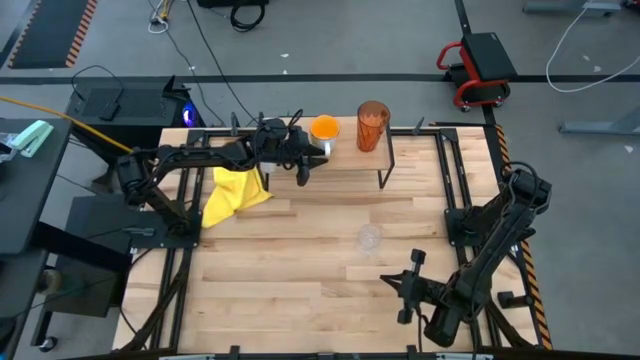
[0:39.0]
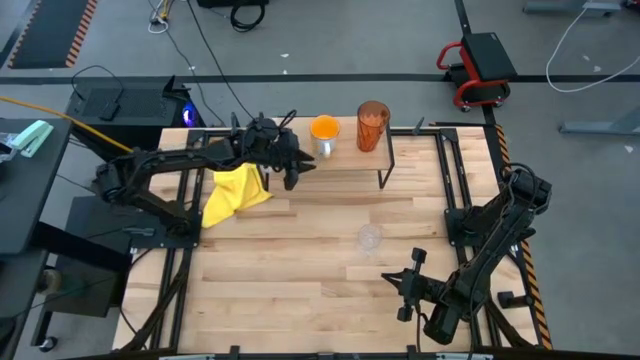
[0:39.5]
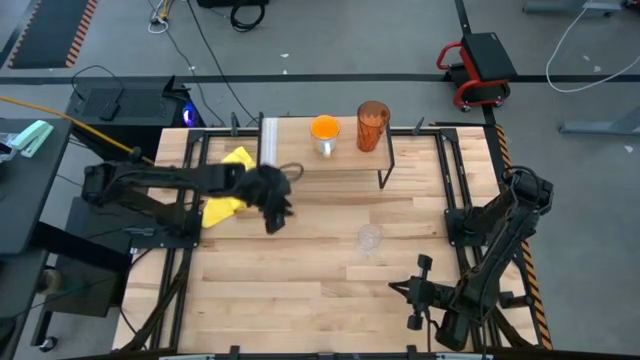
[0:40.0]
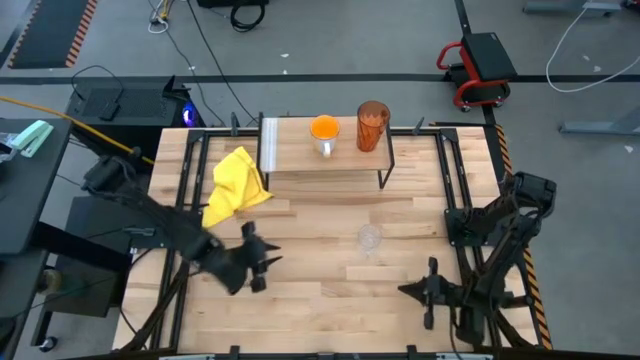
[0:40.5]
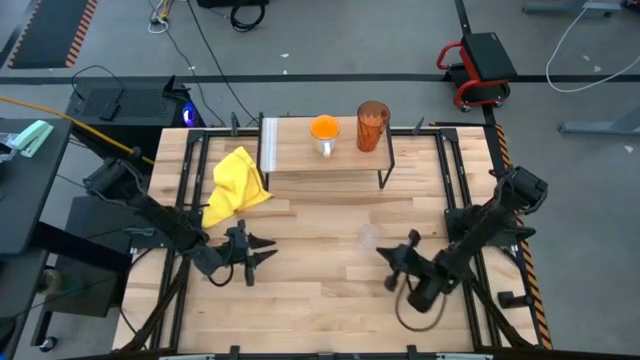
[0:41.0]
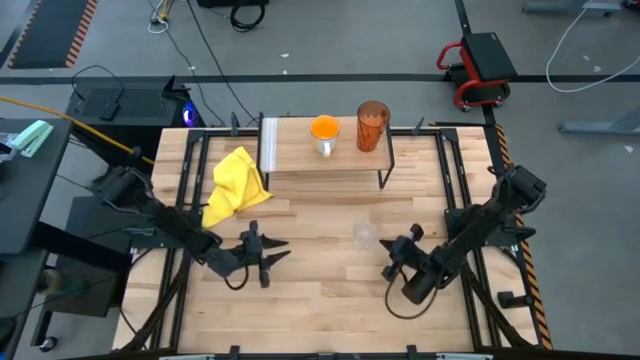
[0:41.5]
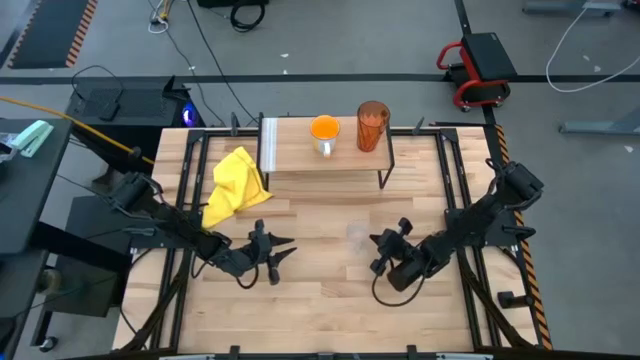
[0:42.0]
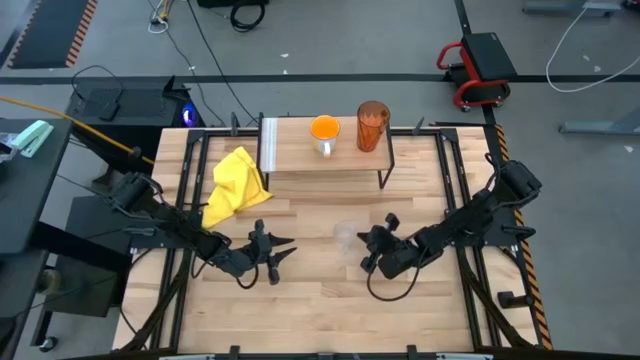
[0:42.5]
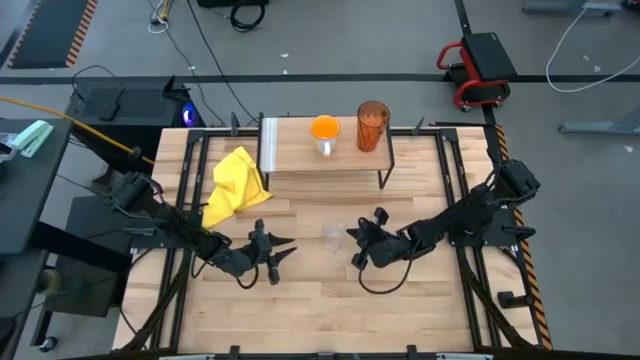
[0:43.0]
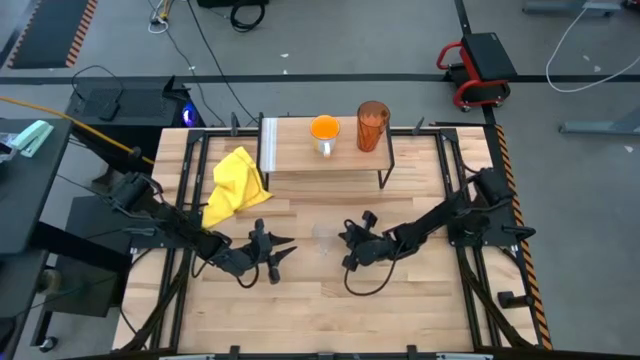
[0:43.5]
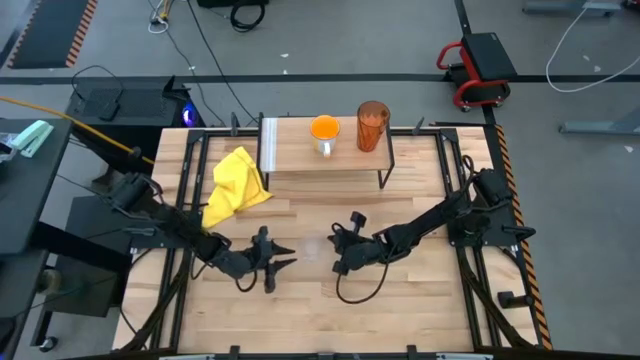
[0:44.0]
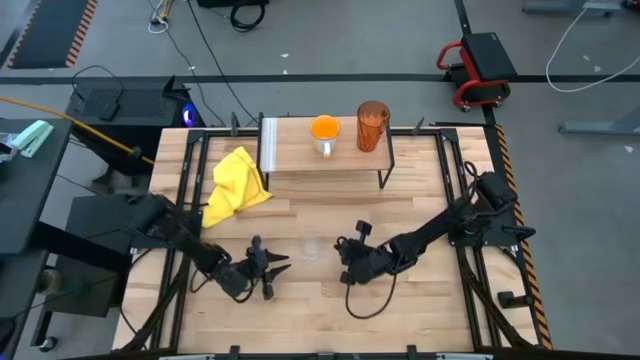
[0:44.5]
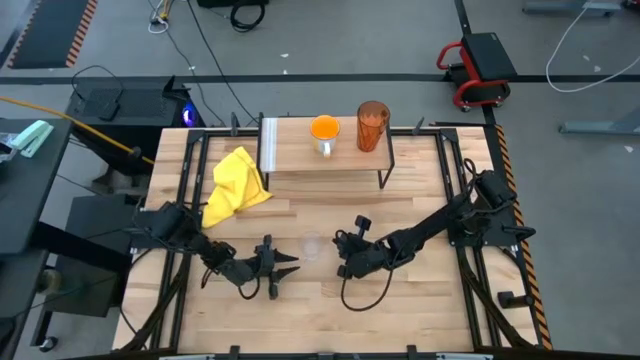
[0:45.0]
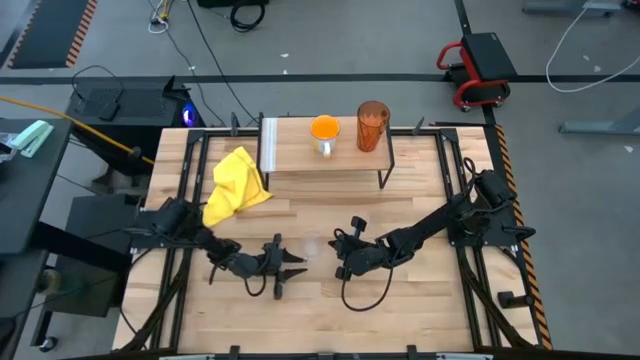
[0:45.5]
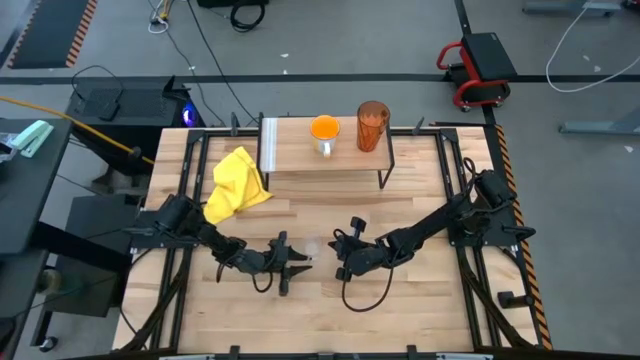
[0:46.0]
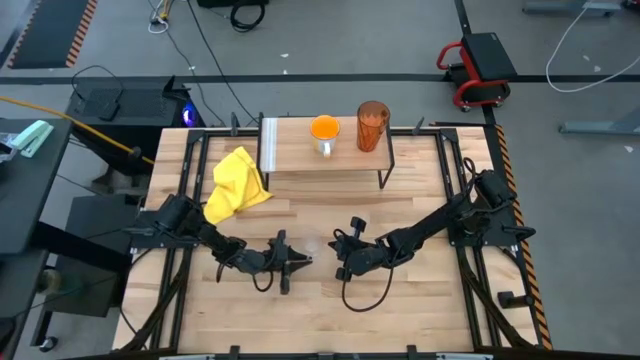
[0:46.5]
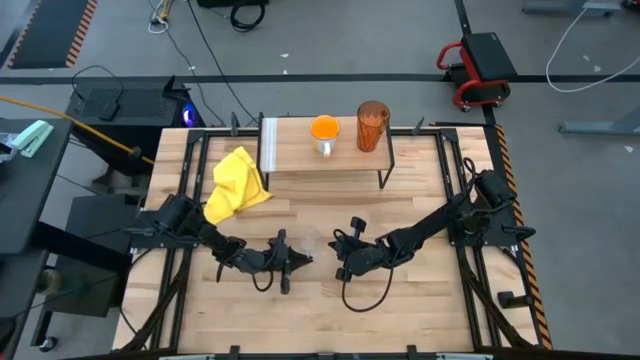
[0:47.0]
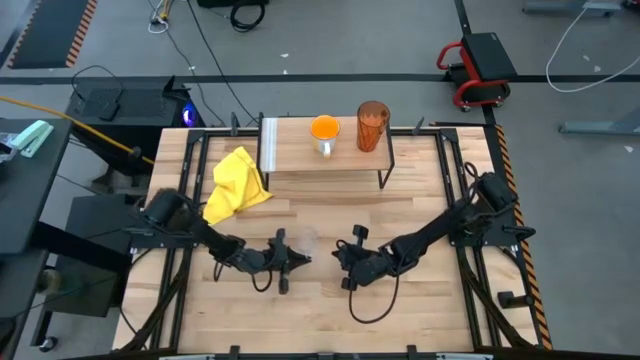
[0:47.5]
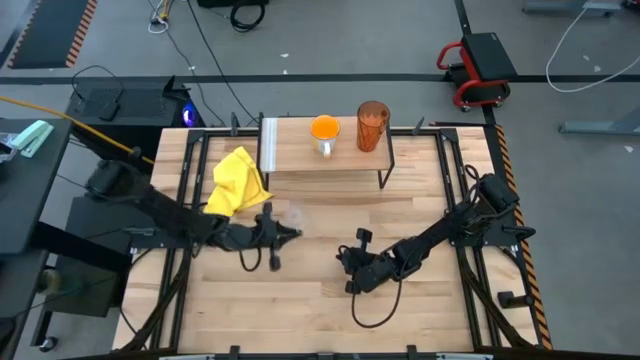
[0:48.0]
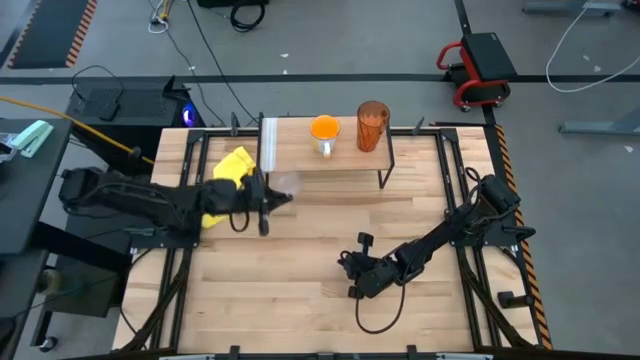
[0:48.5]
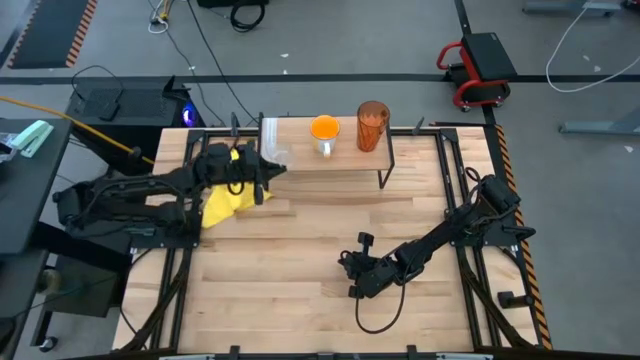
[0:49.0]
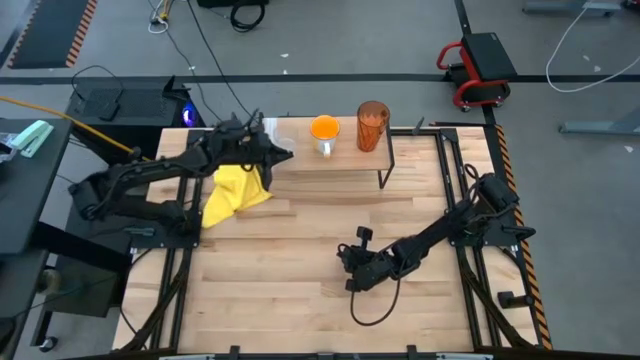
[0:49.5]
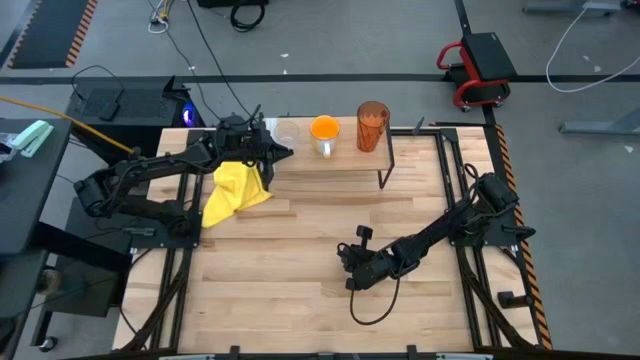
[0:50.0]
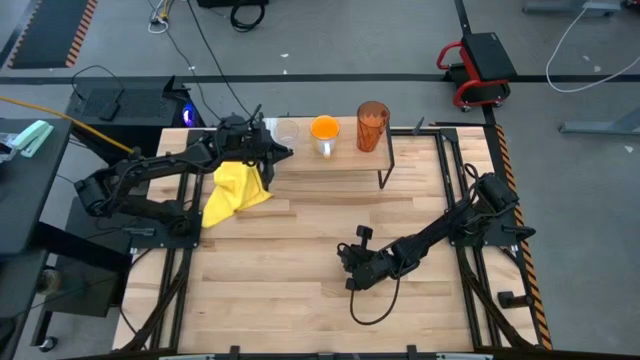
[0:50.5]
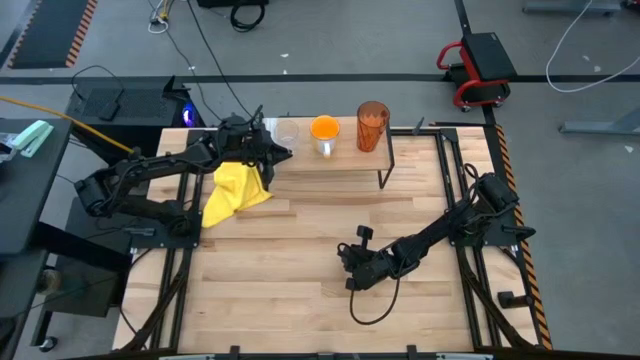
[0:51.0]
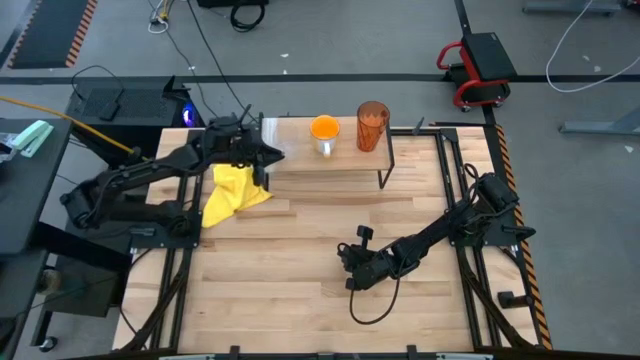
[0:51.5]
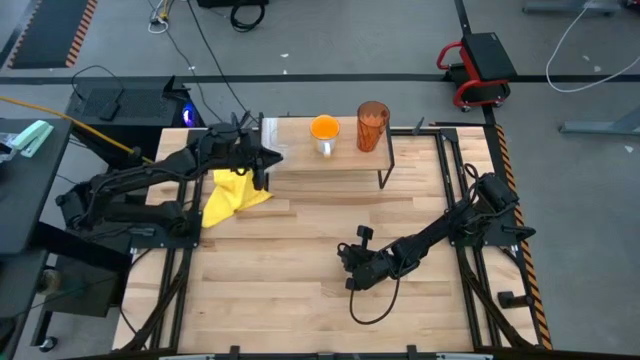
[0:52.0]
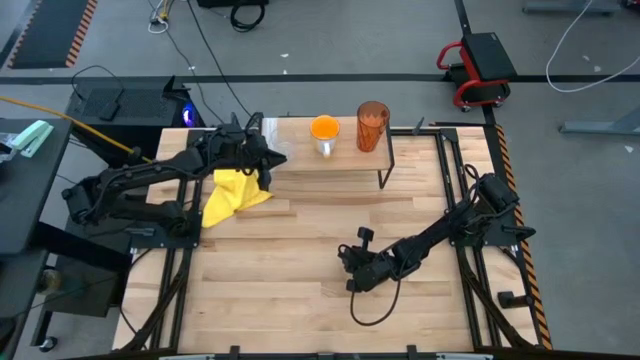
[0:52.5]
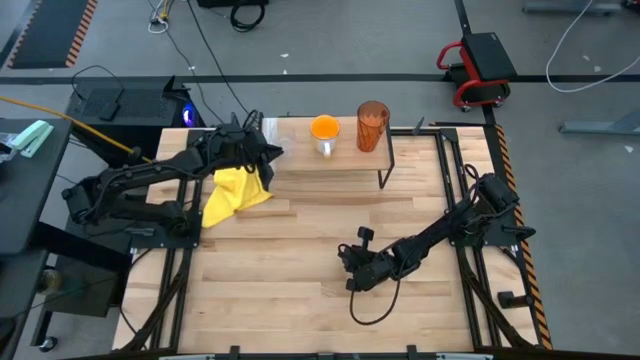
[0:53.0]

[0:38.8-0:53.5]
Task: Stack small to large cups/mugs on shelf
Put the transparent mug on the shelf

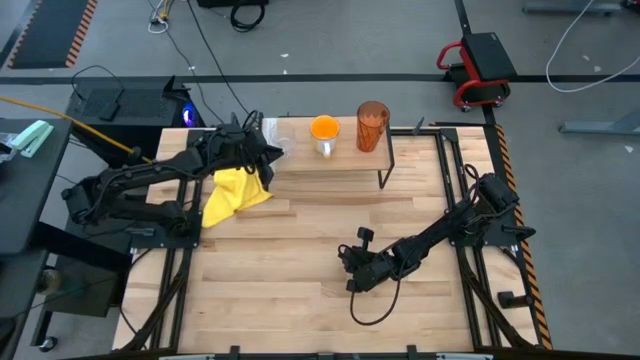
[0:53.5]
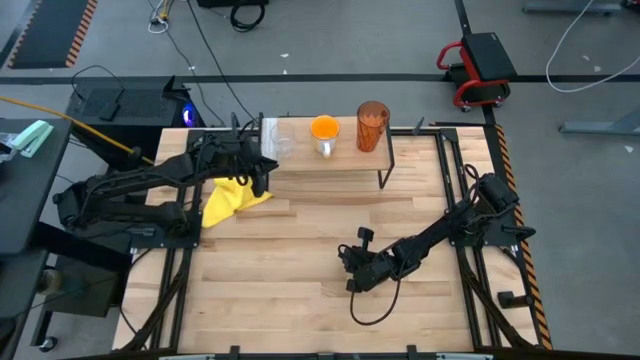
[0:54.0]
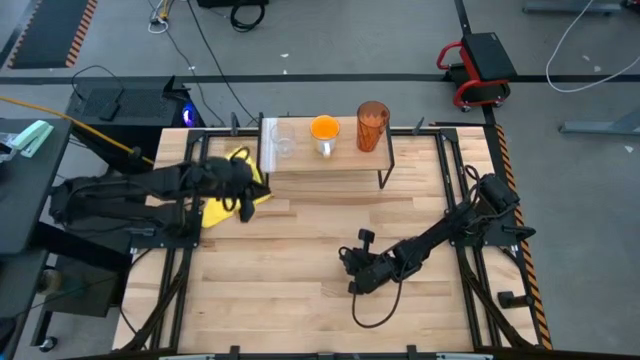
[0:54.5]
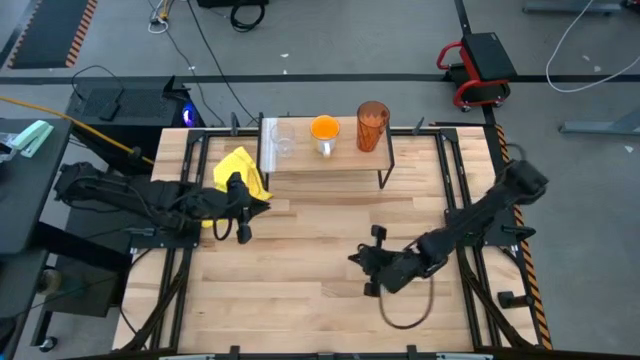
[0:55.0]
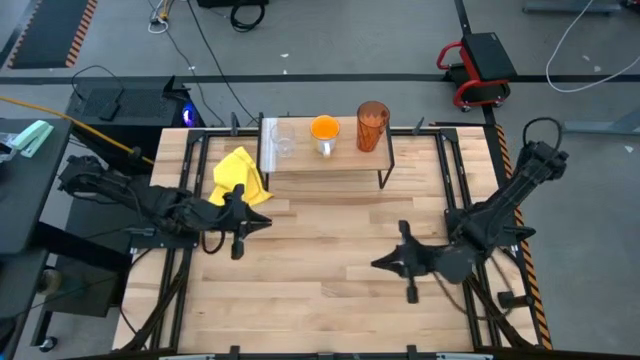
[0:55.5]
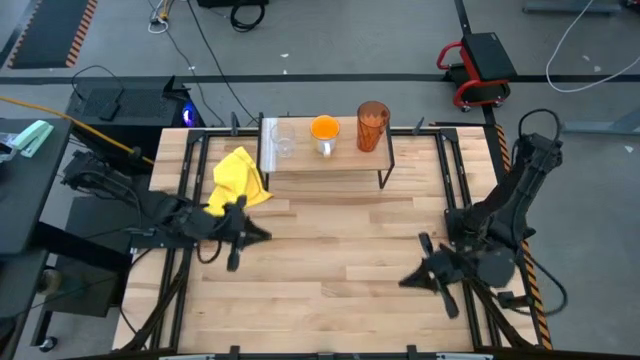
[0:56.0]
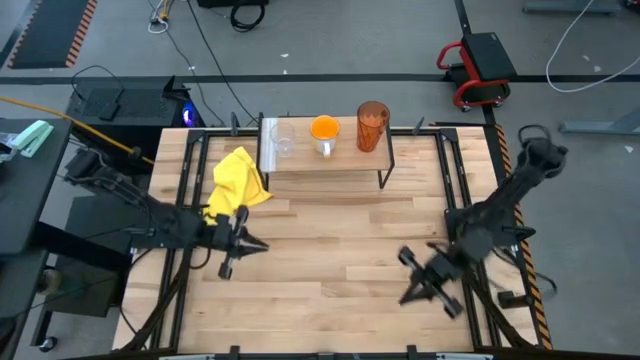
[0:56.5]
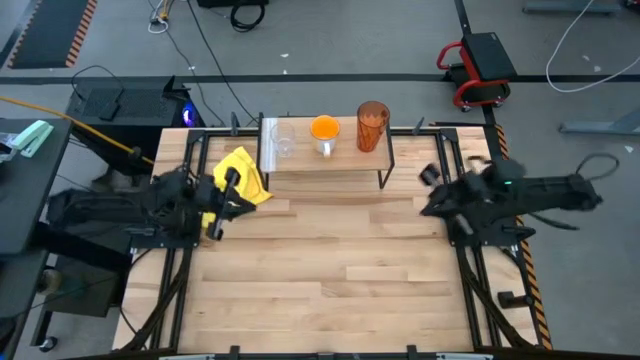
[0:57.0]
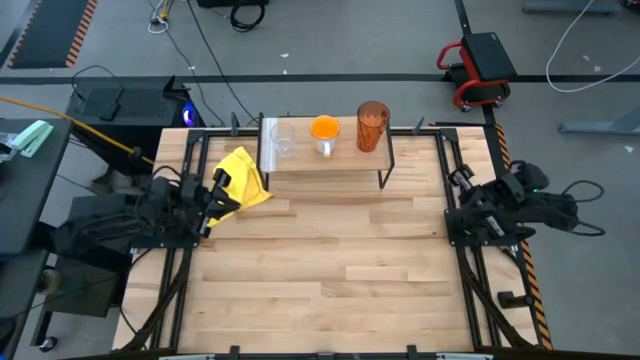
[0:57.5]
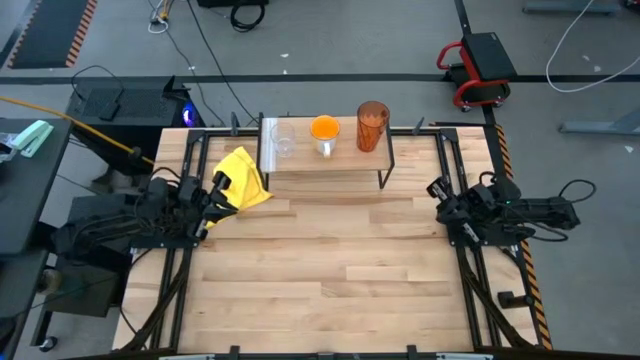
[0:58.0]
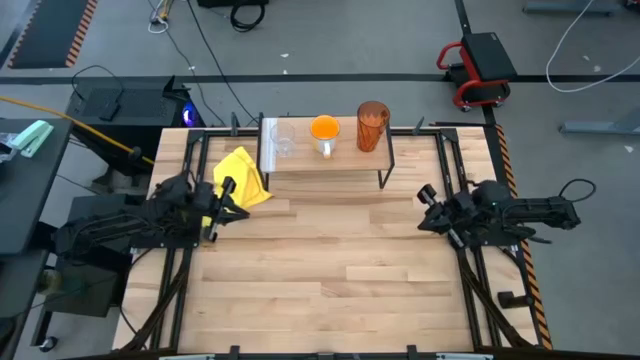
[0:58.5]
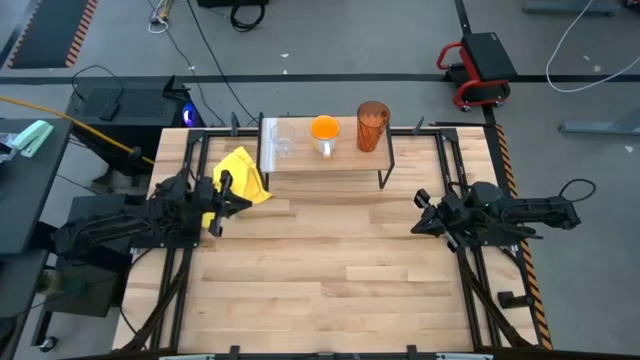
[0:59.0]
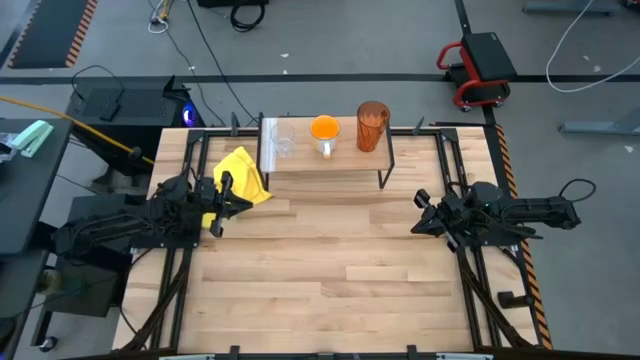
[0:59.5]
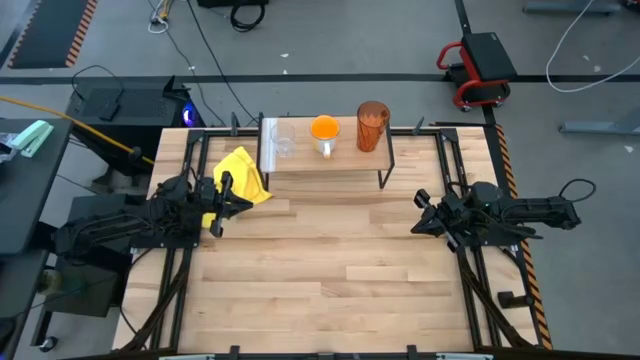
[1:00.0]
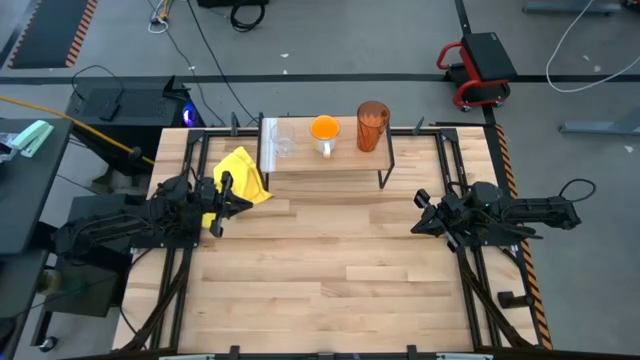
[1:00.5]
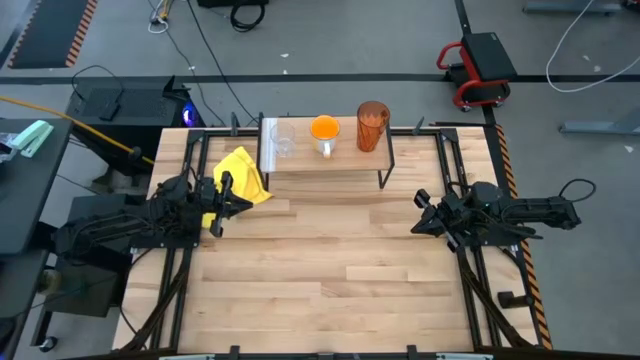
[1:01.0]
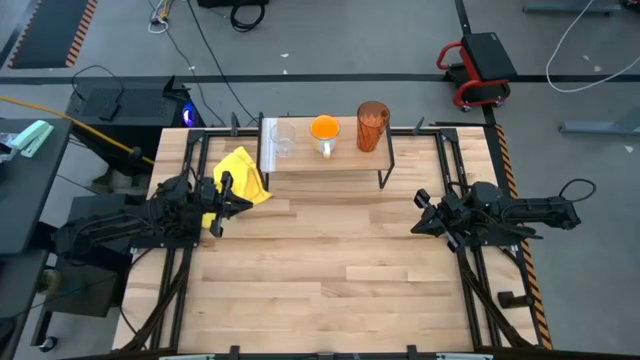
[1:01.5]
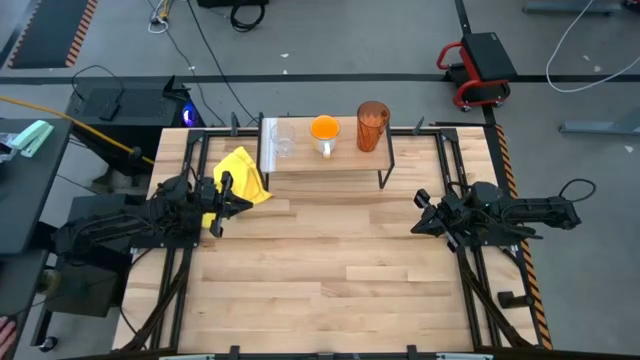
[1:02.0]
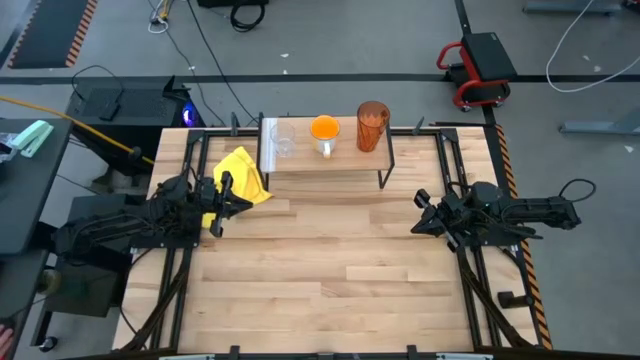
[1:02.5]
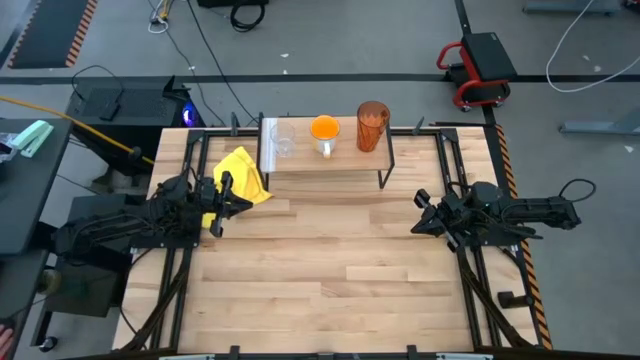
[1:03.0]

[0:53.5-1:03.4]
Return to Home Position
